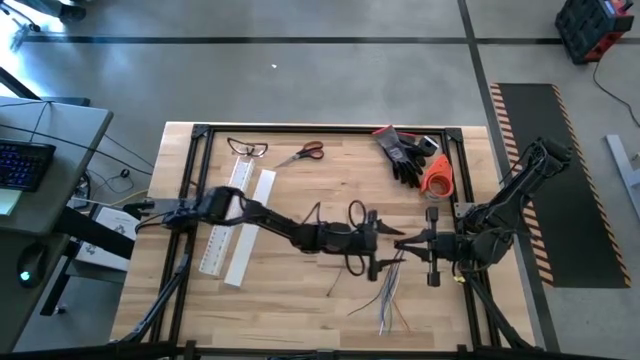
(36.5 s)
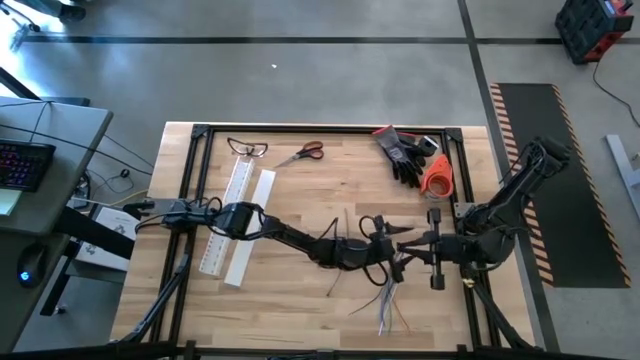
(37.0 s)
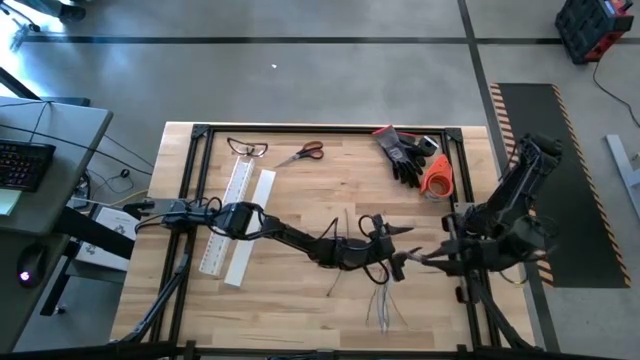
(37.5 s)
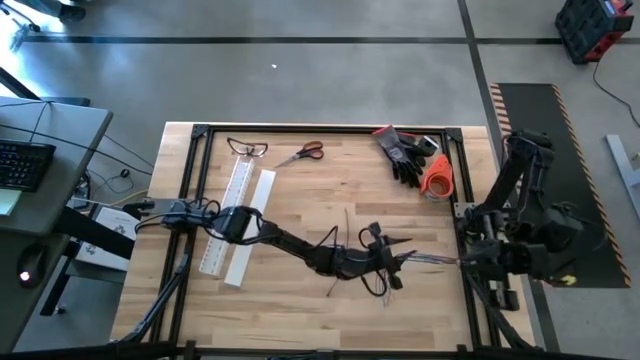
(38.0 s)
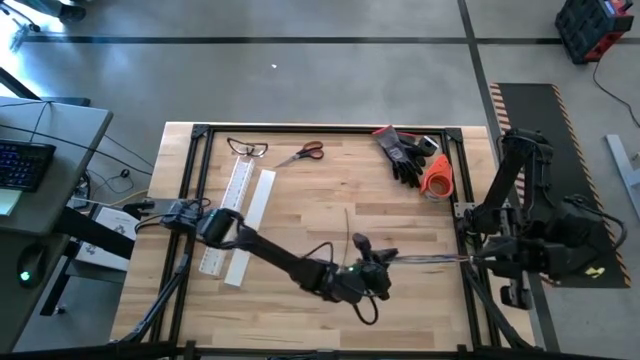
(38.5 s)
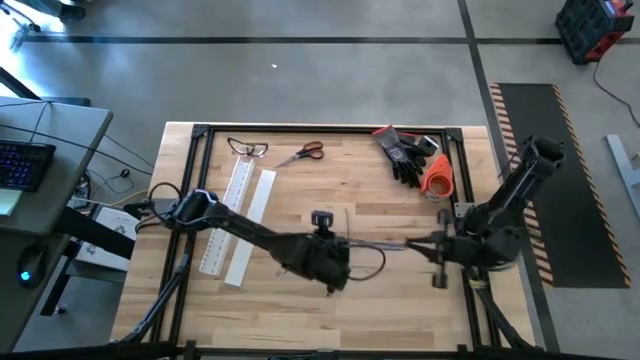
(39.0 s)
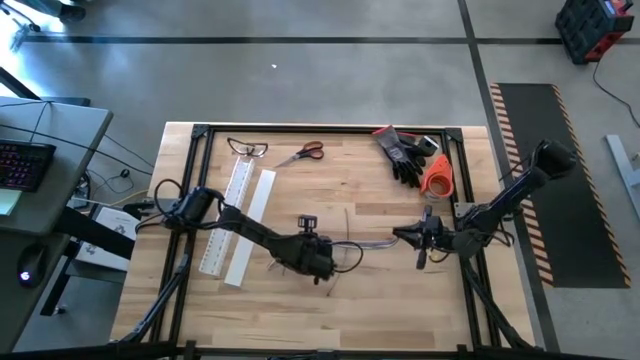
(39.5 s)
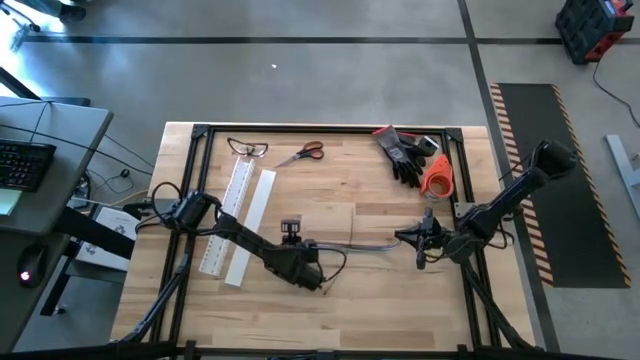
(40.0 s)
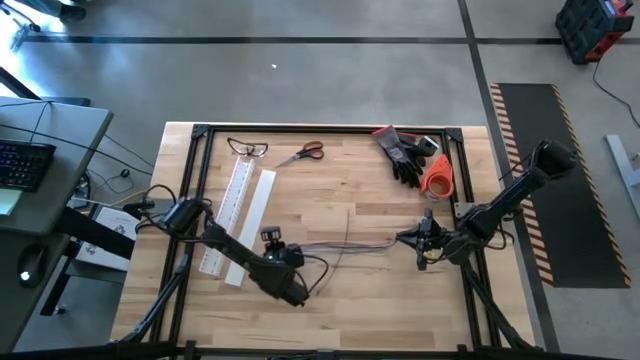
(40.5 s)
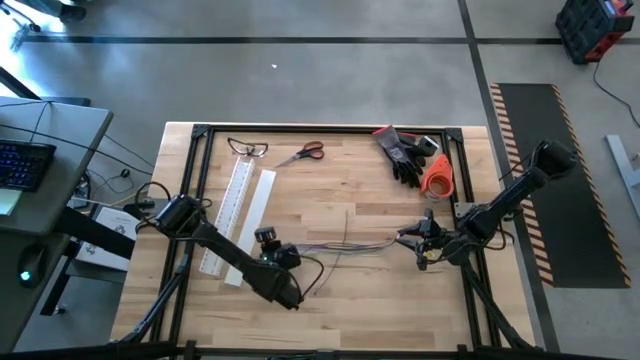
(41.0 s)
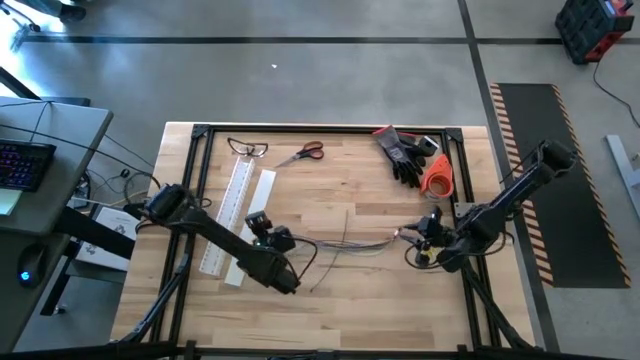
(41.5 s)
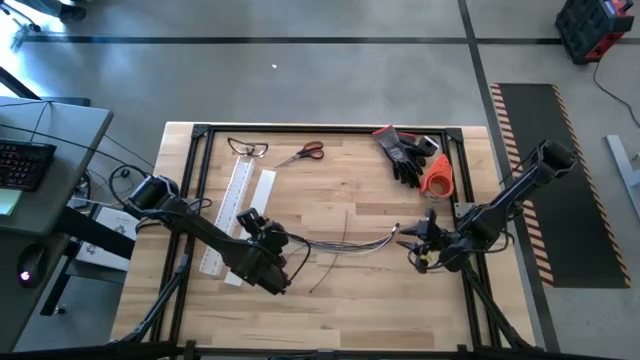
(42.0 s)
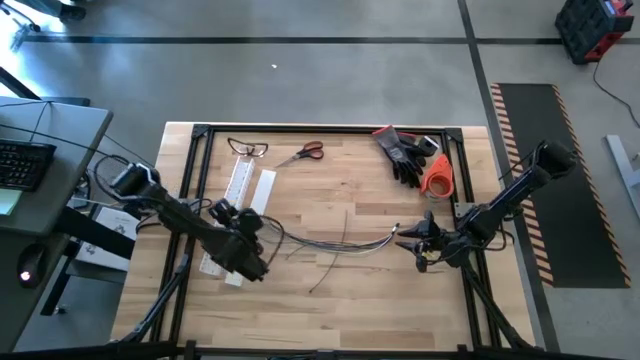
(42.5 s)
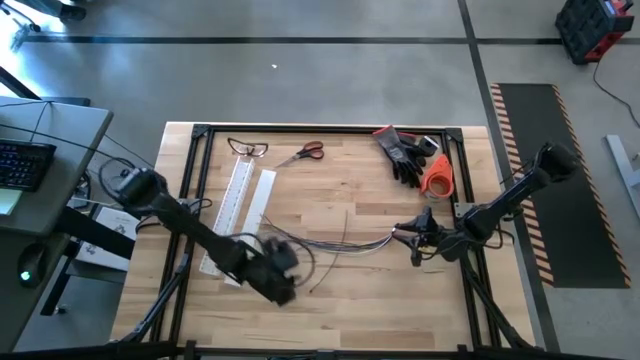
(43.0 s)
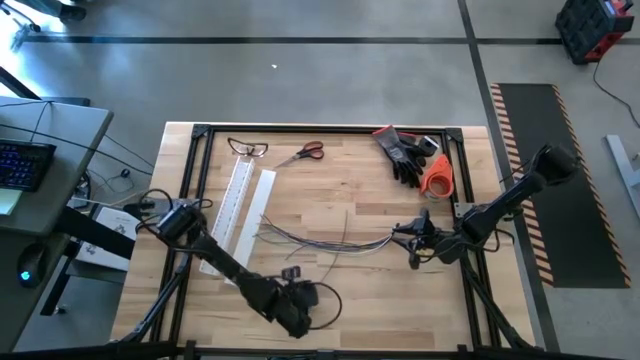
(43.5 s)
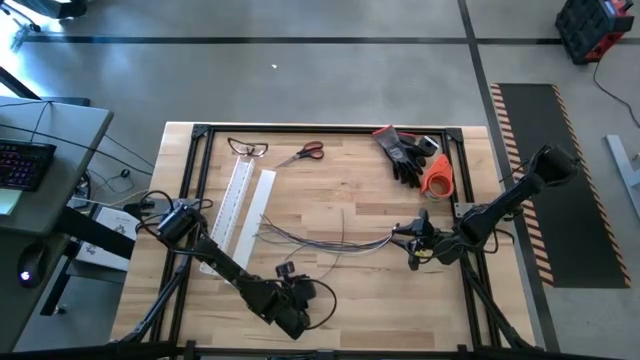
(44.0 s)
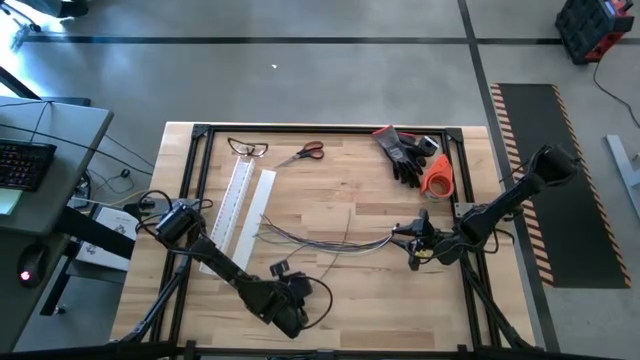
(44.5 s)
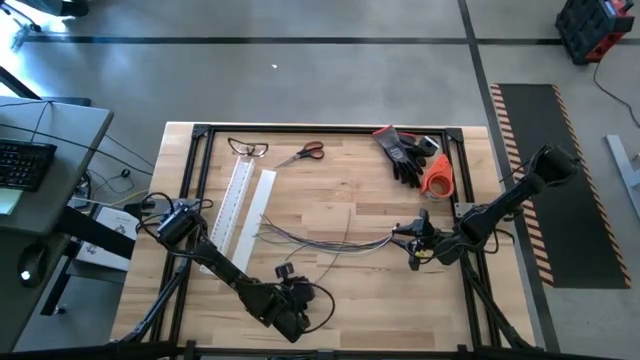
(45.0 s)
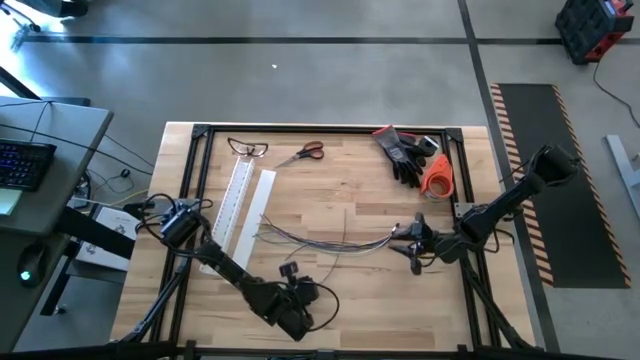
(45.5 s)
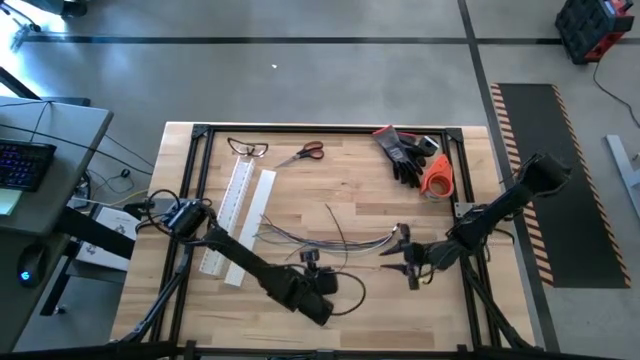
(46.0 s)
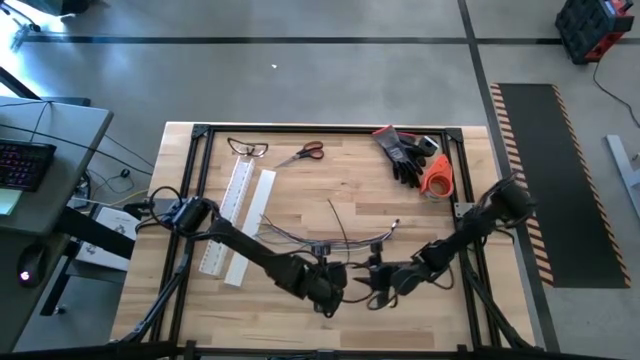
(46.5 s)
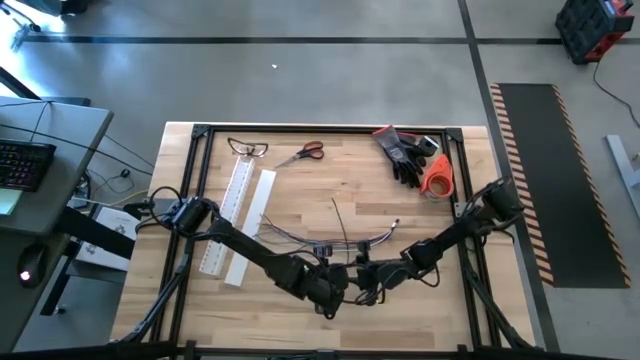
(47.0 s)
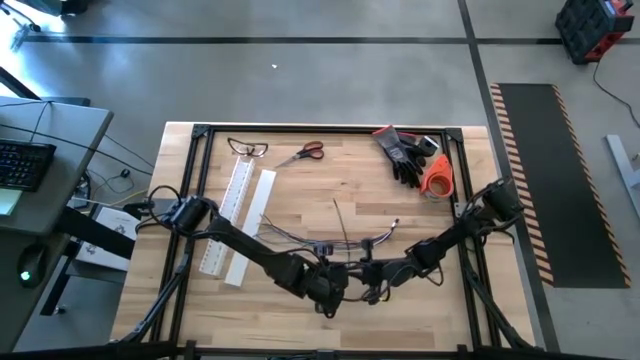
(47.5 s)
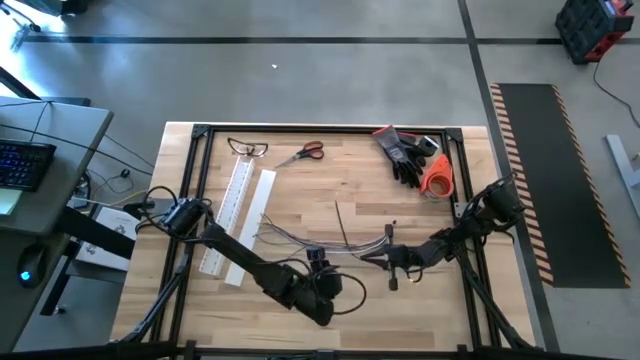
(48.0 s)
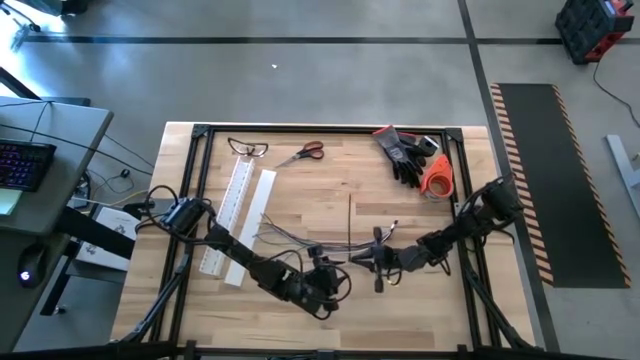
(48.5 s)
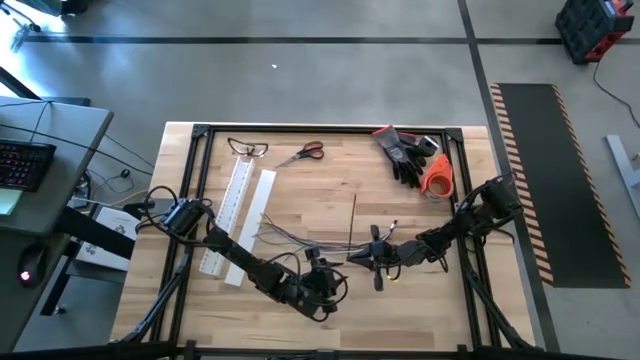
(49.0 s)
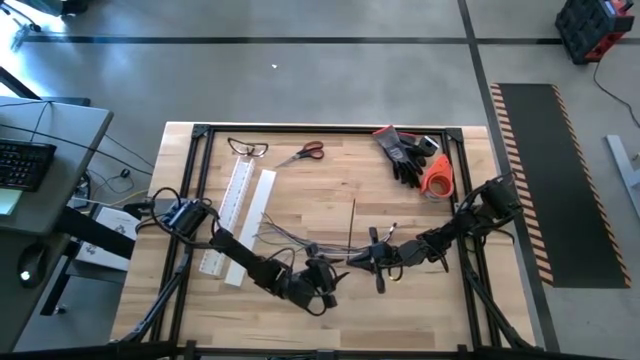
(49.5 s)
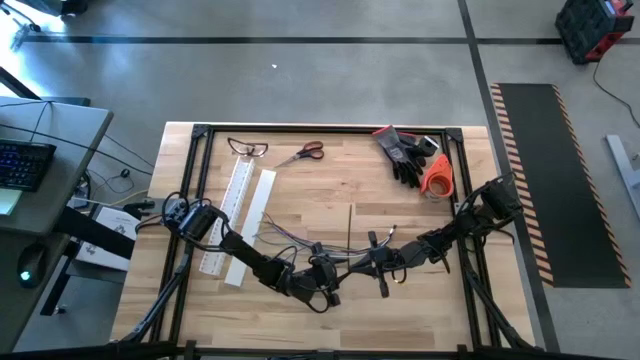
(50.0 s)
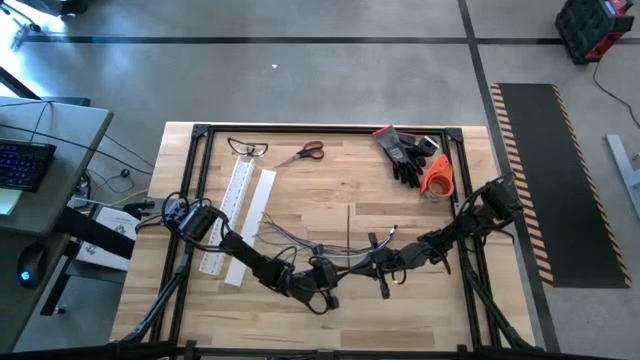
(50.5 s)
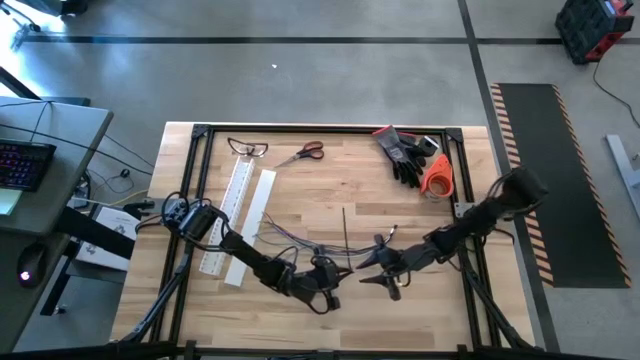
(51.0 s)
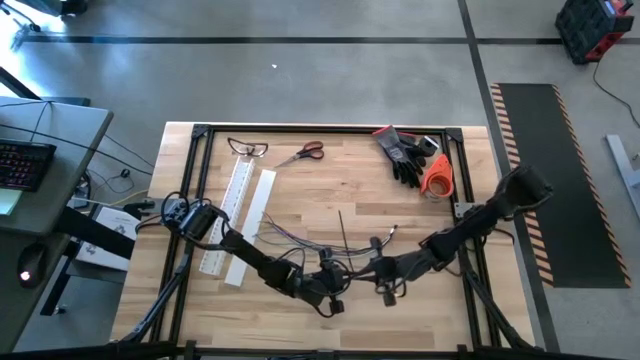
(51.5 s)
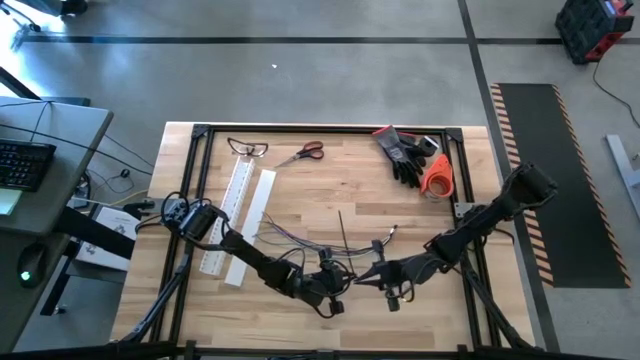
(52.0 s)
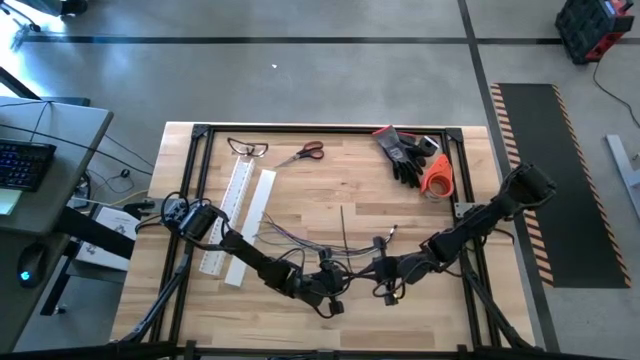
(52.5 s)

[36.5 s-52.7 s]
Task: Ziptie cables
Wrap the black zip tie around the cable

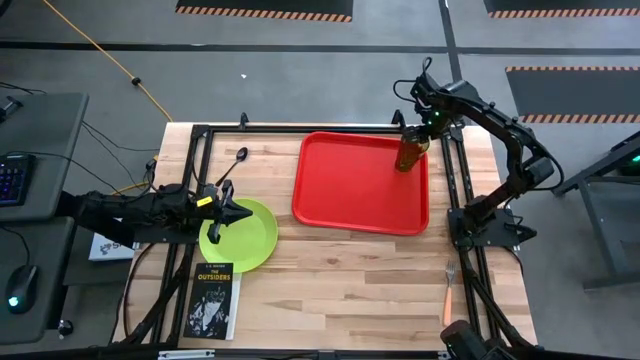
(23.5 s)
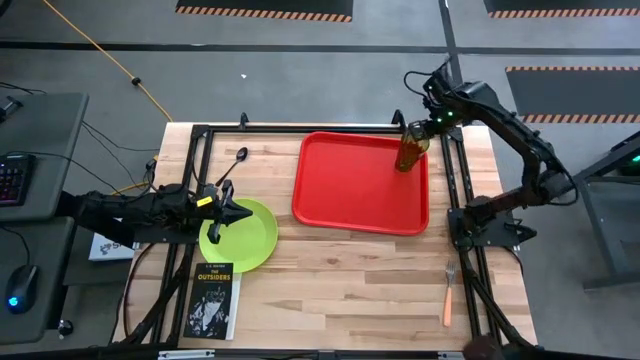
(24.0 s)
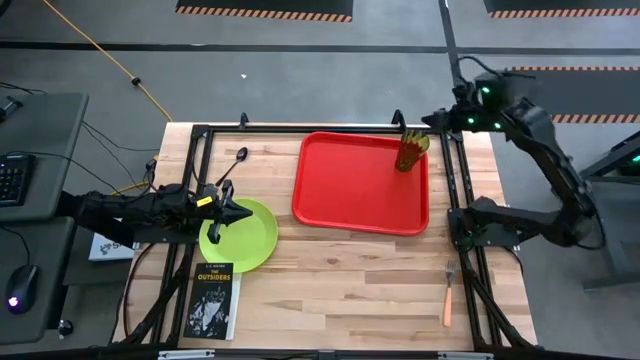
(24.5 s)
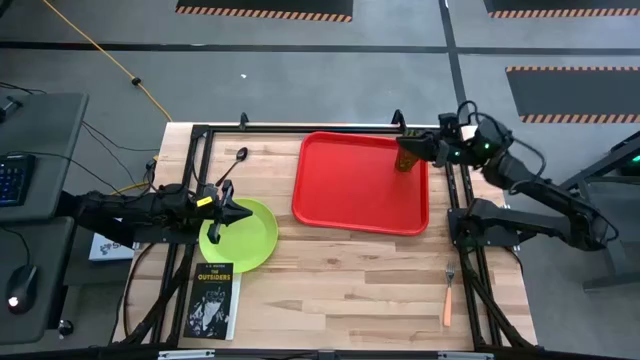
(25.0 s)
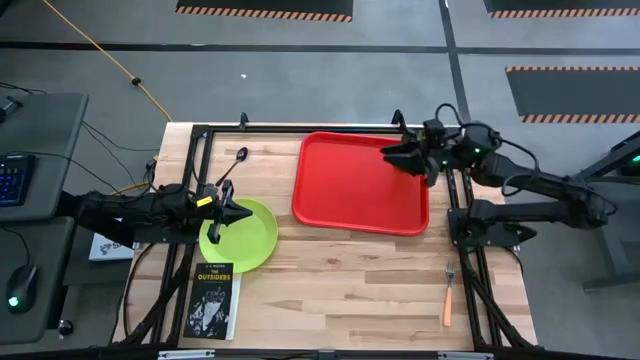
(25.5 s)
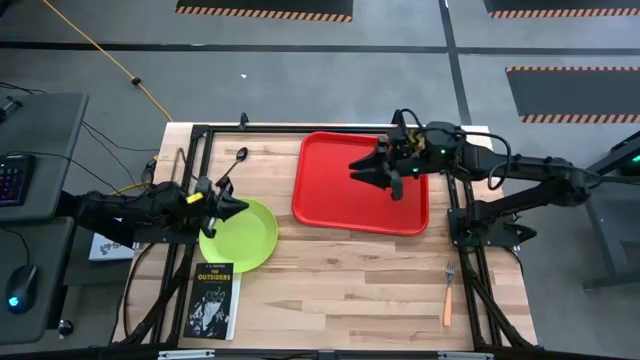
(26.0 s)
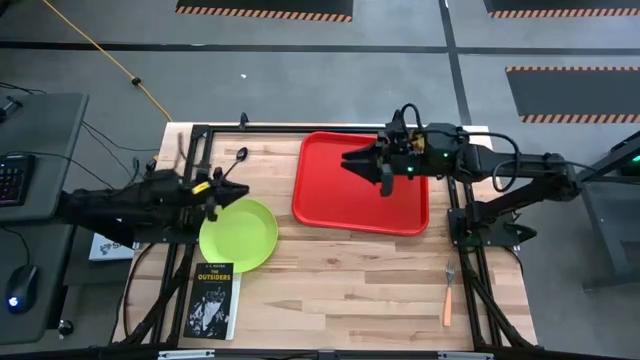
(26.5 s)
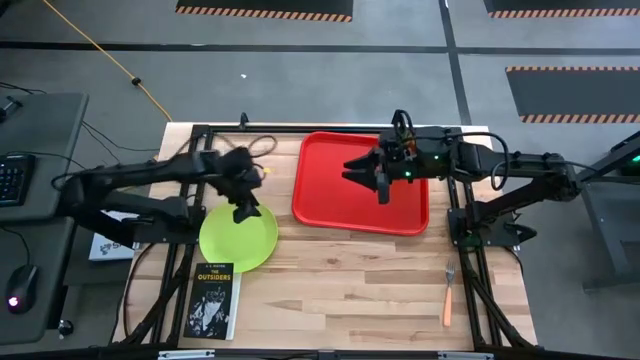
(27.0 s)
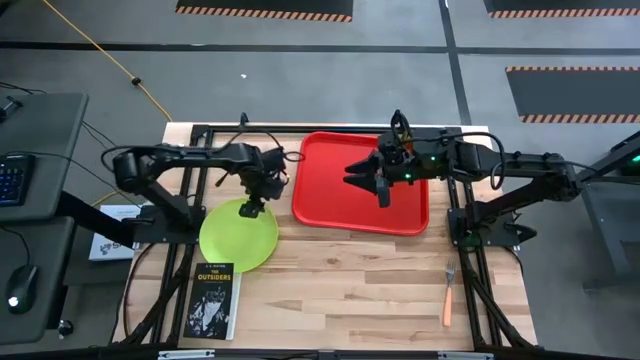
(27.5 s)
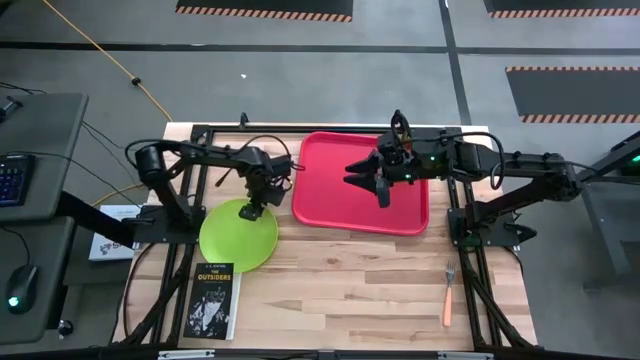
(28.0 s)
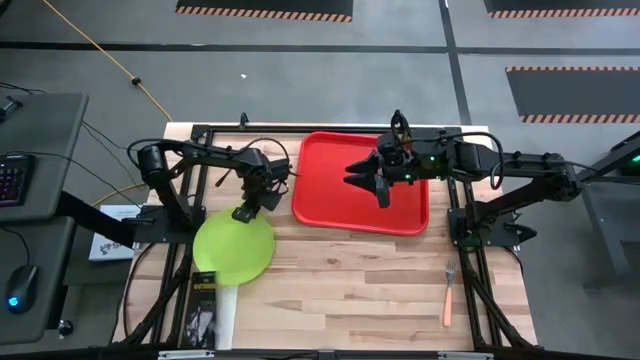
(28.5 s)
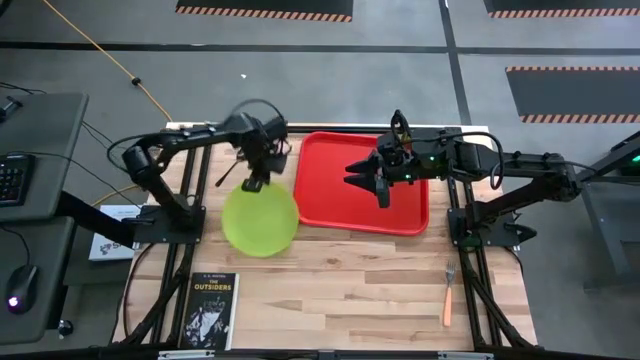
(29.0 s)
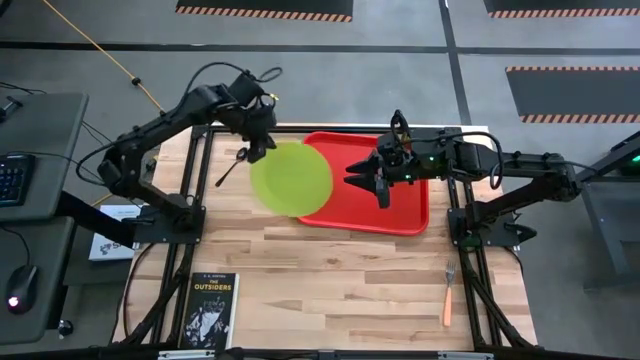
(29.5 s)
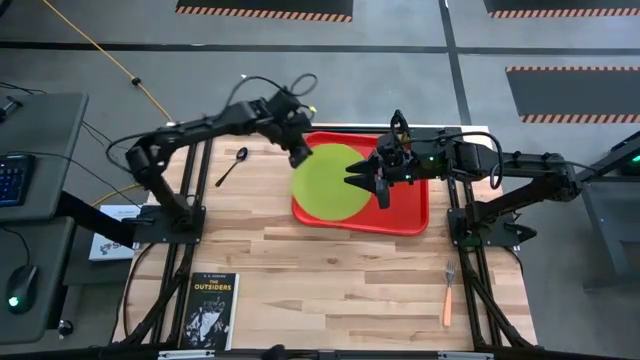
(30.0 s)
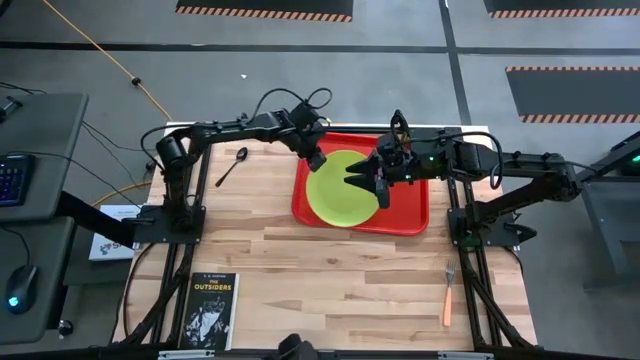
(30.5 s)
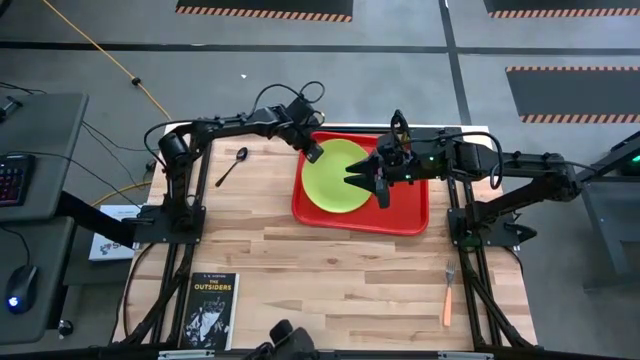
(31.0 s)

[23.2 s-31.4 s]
Task: Pick and place plate/cup/fork/spoon on tray
Put the green plate on the red tray
